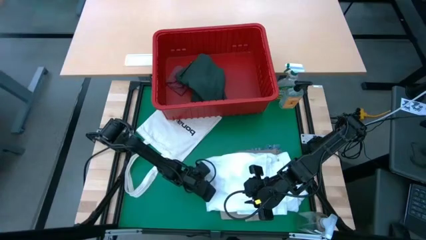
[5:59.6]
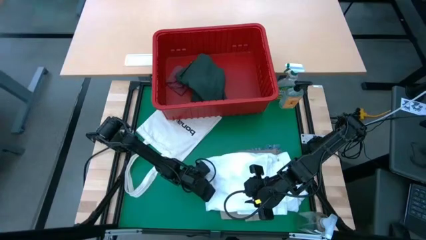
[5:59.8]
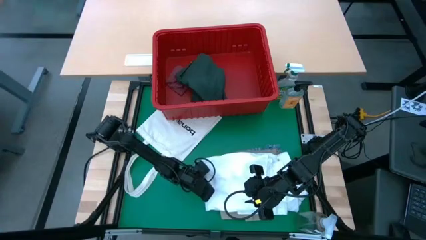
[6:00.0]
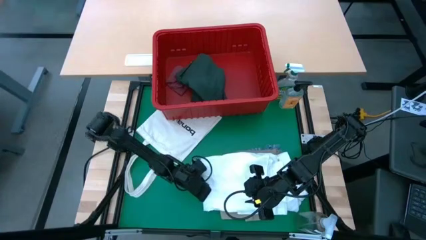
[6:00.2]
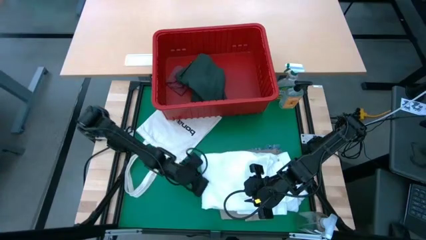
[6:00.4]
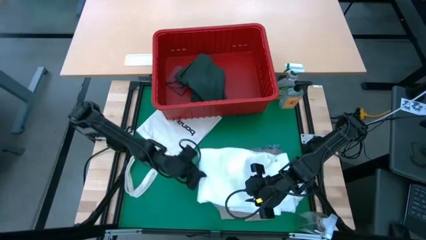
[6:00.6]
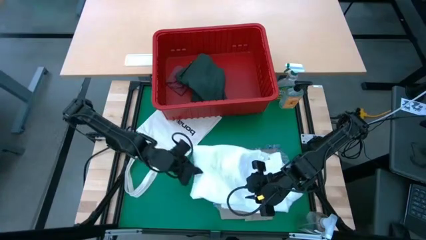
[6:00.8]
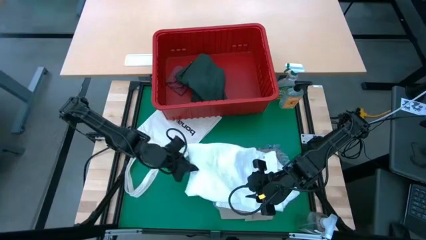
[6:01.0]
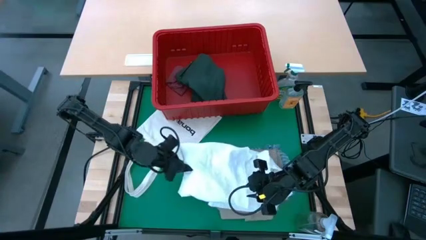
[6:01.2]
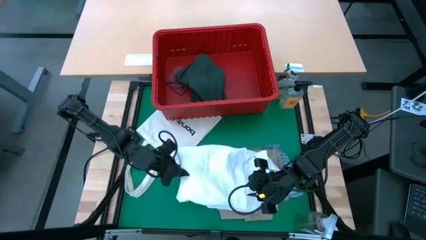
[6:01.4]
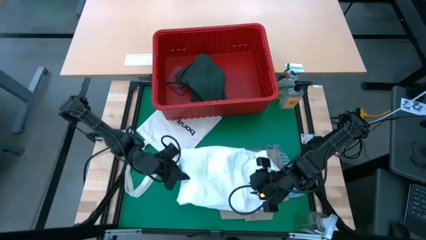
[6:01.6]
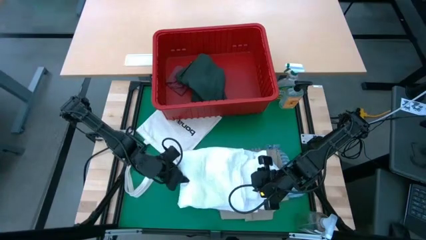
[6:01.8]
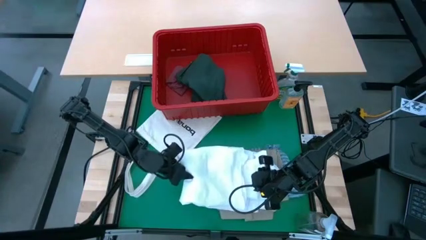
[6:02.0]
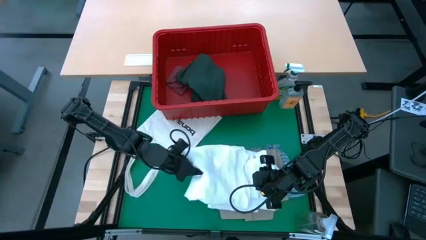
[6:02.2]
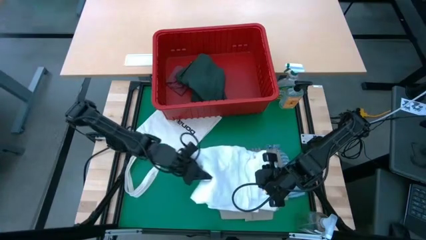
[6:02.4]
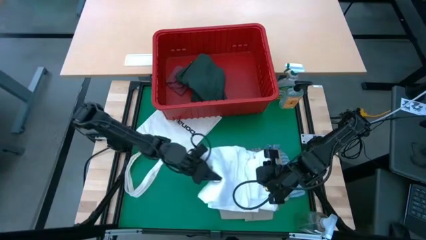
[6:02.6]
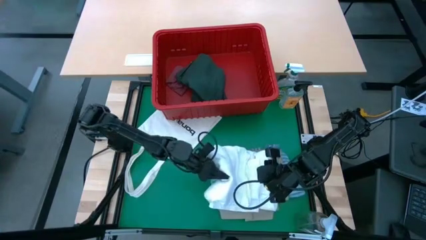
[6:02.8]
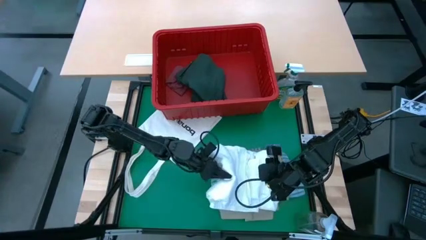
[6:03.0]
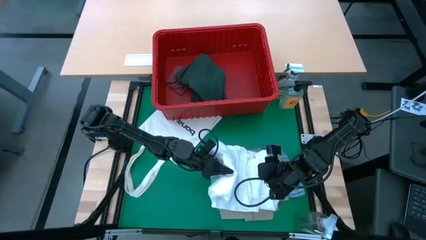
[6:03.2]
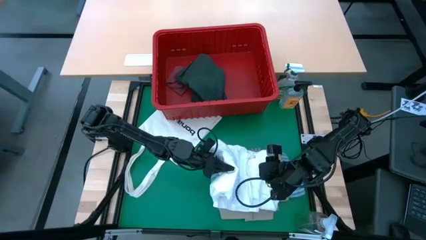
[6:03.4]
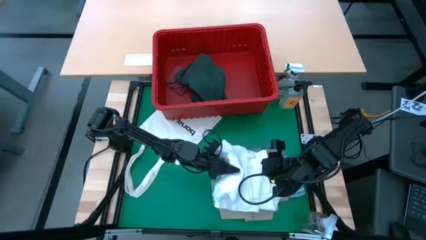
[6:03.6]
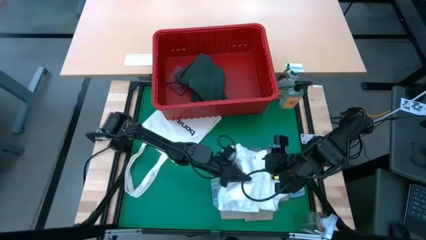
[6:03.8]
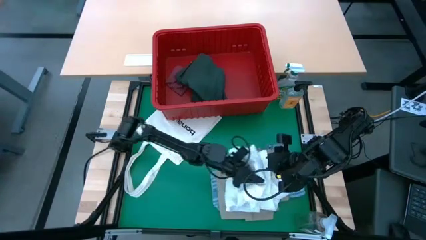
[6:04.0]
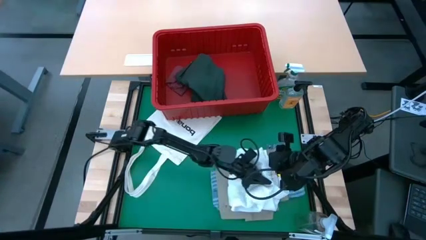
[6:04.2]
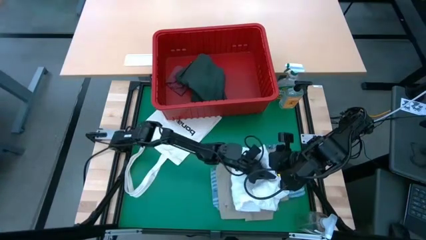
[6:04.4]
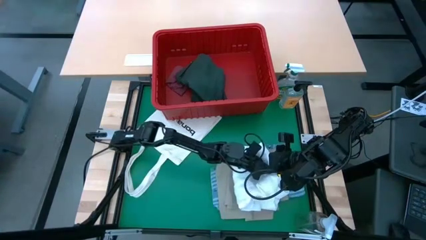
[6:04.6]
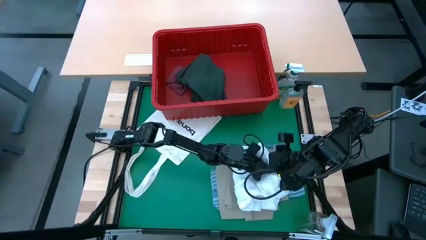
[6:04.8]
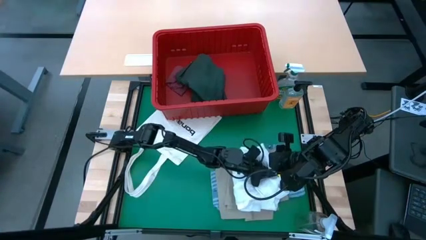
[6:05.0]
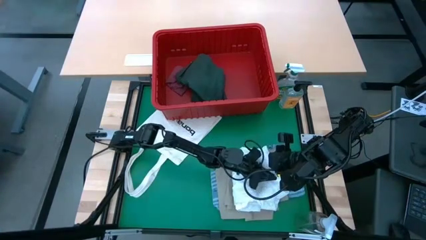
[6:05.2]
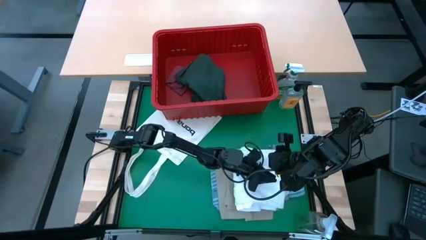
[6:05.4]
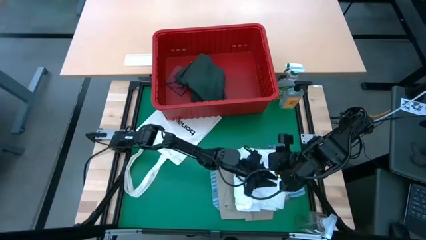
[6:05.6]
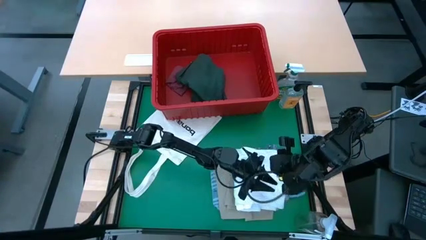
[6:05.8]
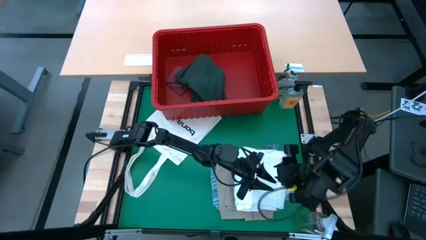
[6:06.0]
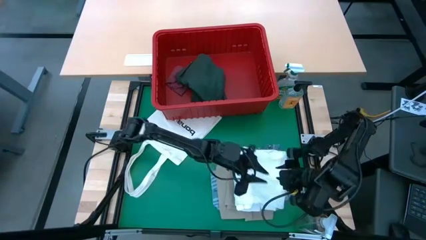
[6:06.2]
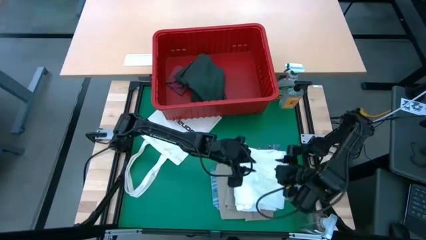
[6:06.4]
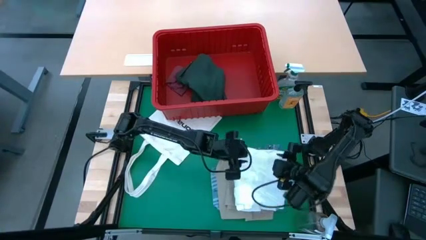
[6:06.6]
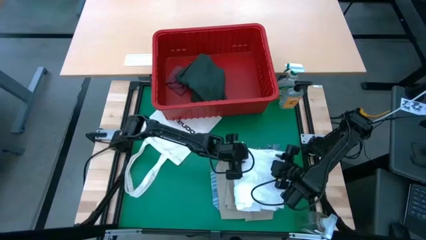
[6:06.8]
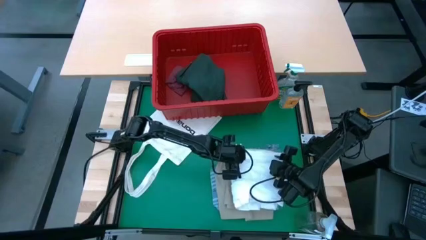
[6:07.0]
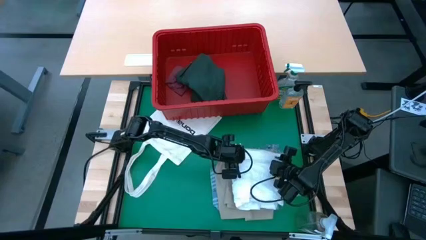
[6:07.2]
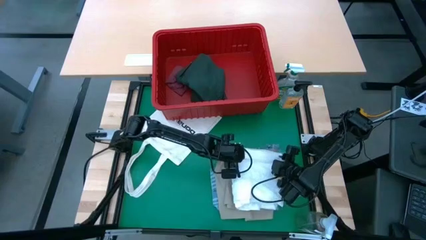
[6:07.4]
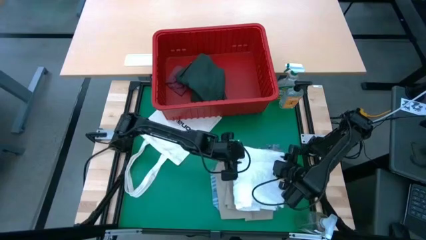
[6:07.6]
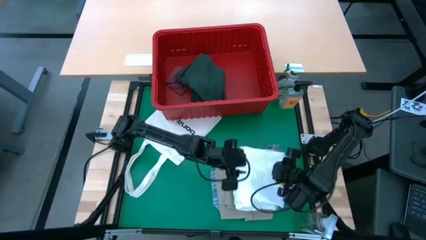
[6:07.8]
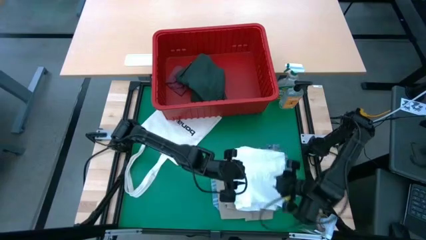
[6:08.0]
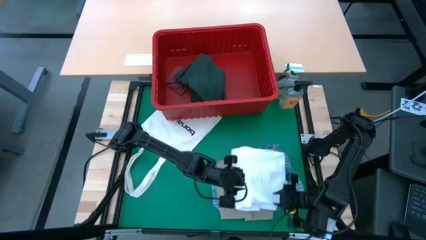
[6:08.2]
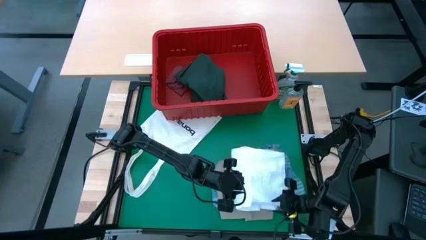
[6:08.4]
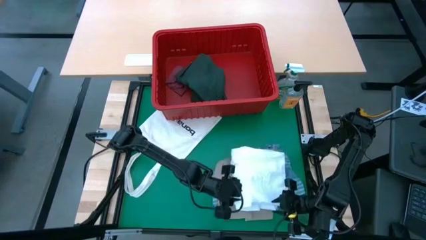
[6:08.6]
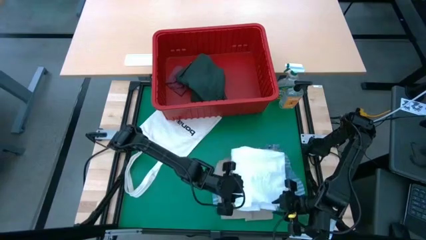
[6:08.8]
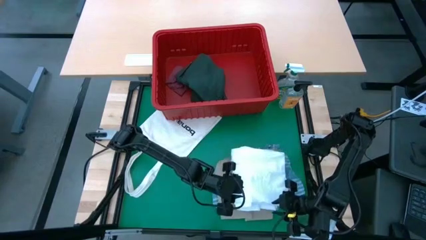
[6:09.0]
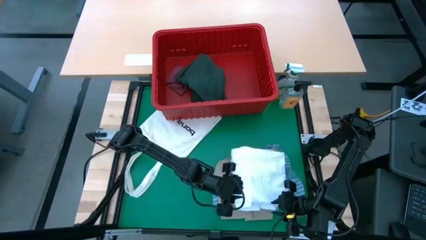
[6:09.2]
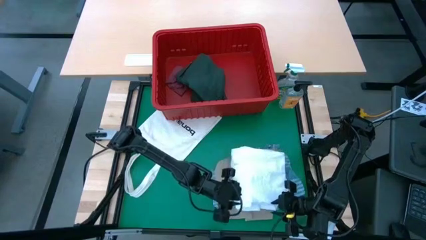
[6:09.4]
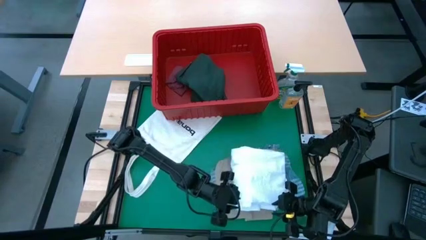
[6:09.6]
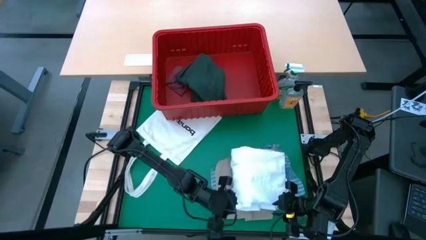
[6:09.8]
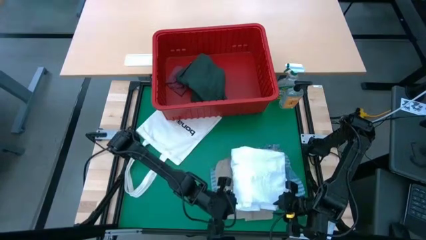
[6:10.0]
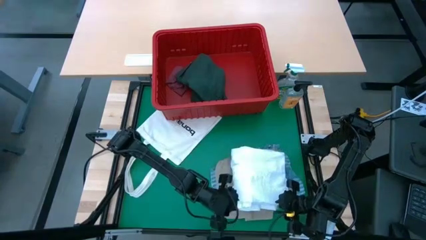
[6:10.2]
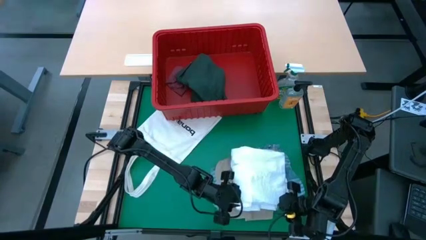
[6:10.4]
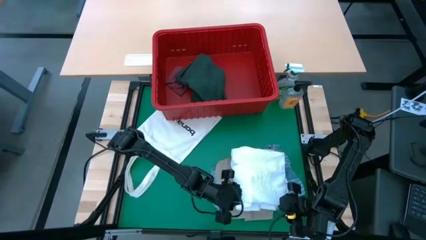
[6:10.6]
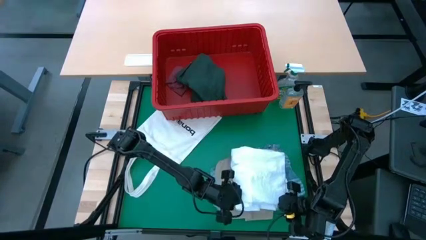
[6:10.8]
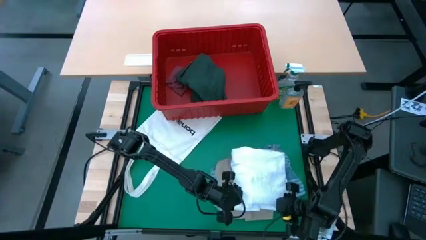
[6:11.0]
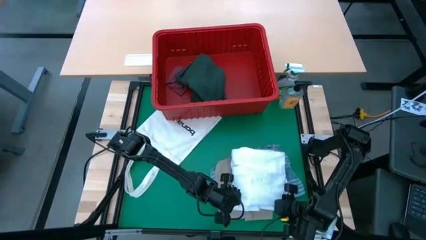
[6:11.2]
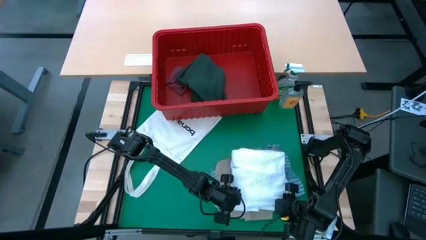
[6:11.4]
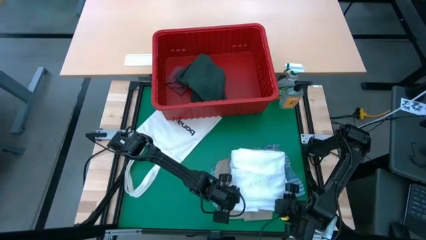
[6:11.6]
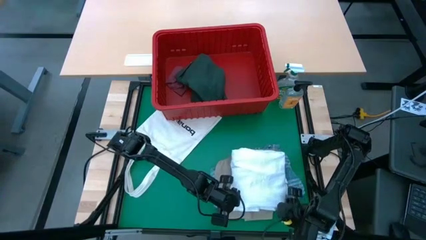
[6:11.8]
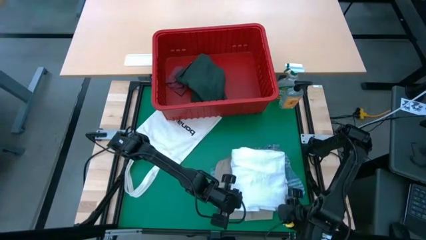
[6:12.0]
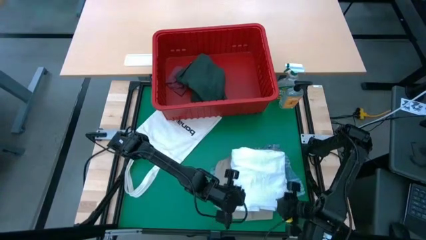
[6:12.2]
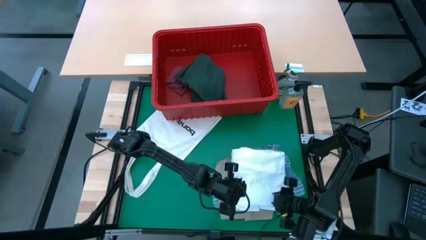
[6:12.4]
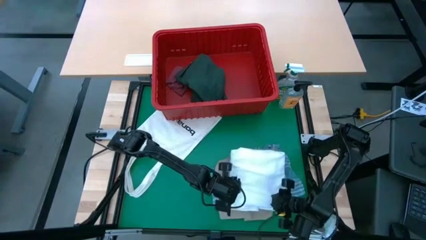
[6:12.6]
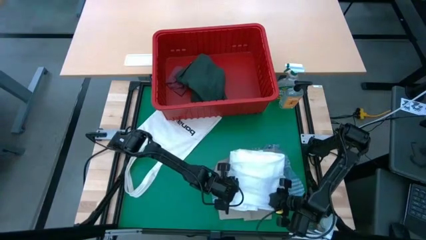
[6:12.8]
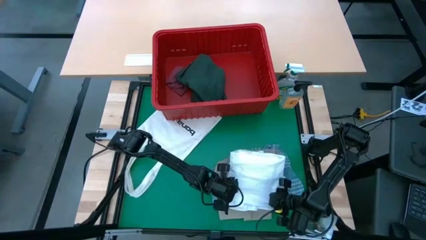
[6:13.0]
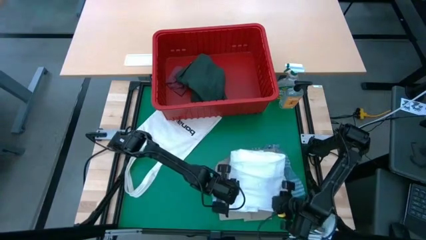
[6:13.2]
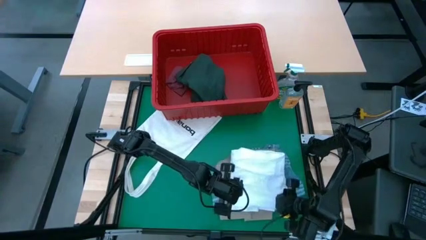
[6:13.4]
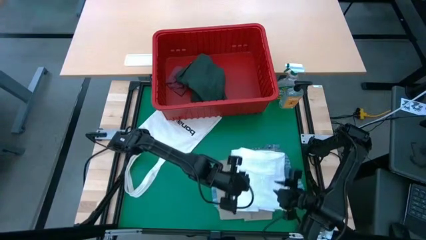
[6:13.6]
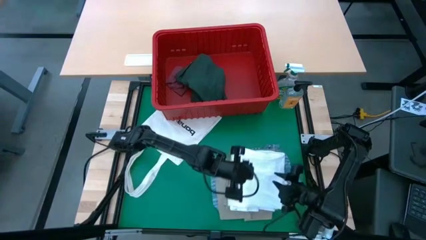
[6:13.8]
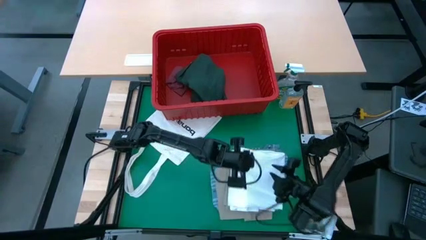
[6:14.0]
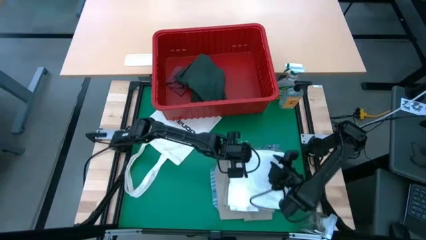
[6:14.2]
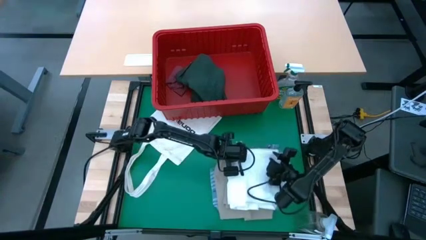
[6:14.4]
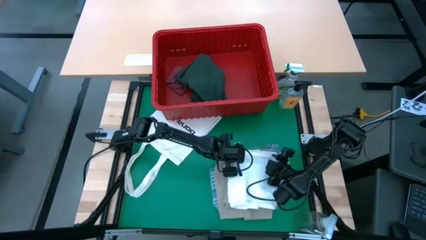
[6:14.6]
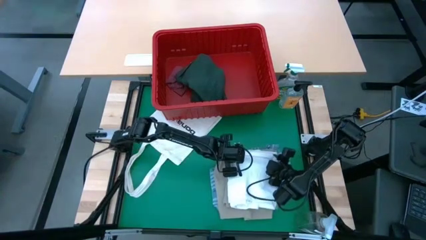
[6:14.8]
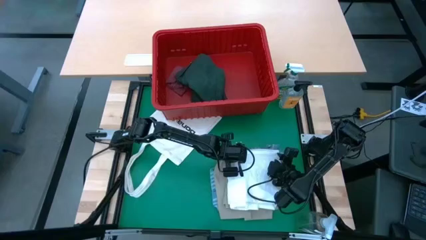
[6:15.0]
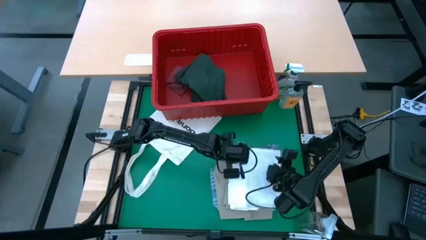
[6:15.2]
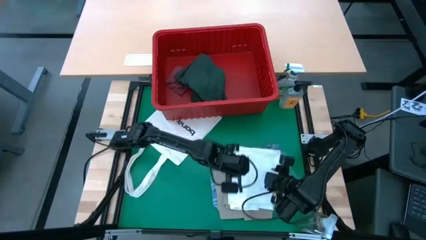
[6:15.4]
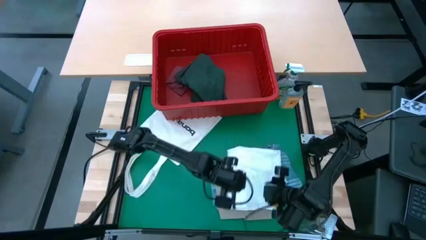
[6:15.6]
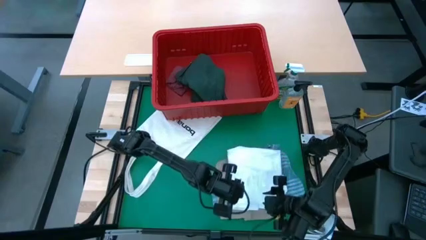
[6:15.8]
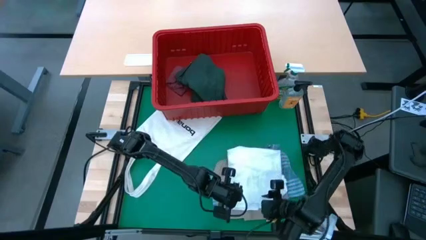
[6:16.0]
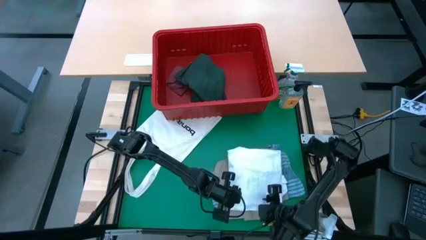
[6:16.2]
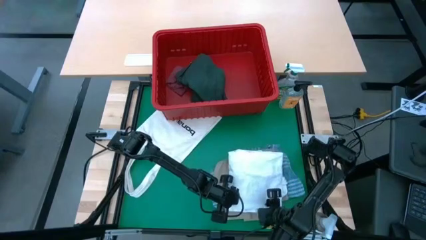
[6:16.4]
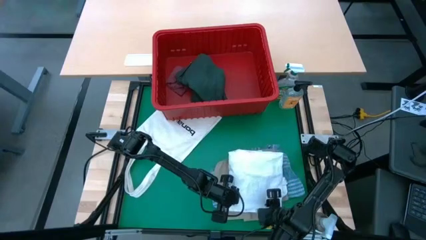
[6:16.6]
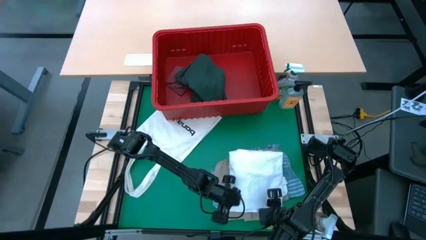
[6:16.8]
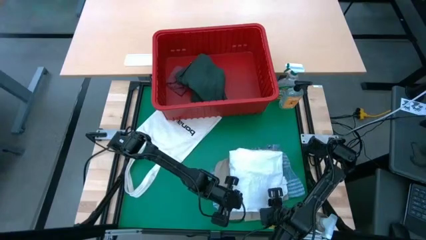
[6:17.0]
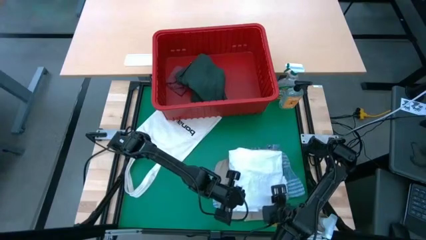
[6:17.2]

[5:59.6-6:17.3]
Task: Fold Laundry from Bin
Fold the white polo shirt
